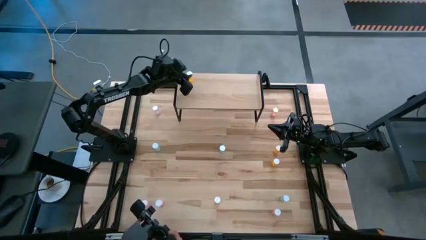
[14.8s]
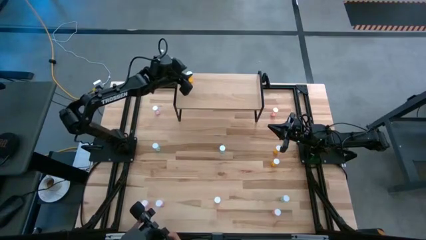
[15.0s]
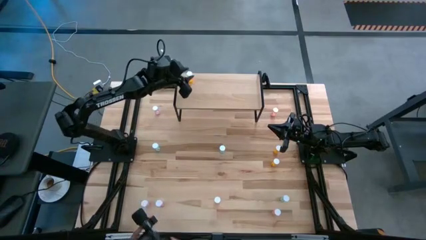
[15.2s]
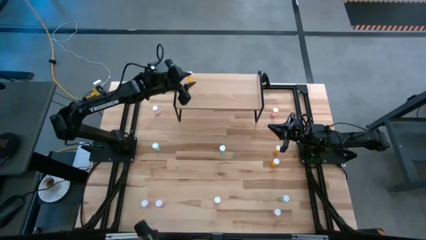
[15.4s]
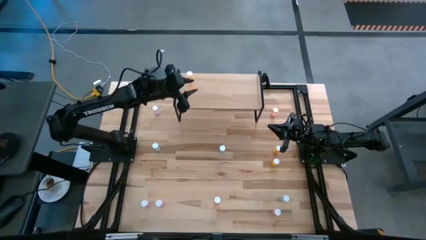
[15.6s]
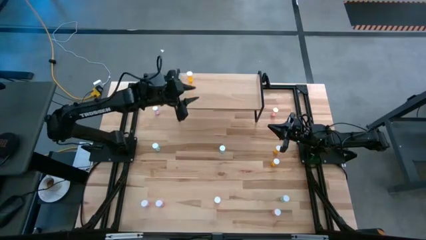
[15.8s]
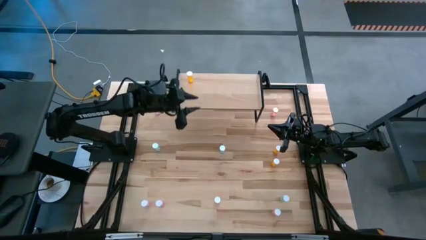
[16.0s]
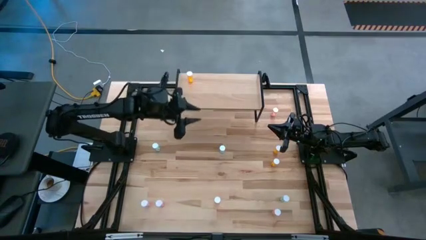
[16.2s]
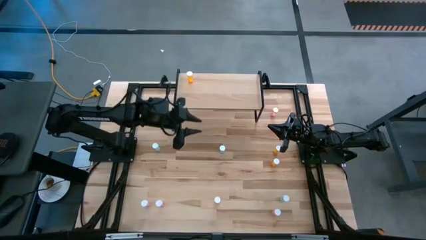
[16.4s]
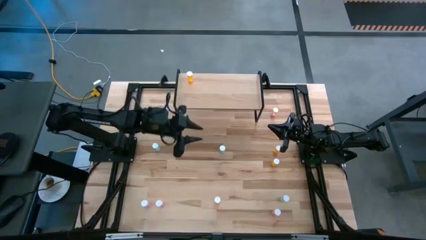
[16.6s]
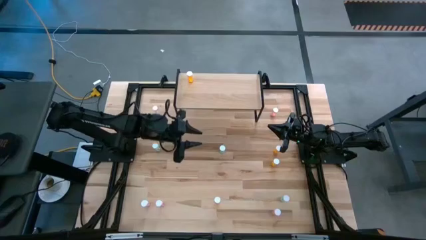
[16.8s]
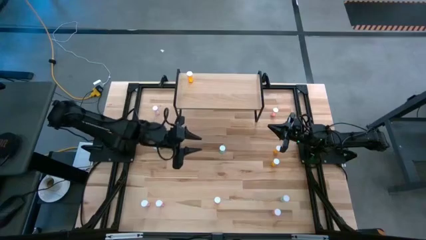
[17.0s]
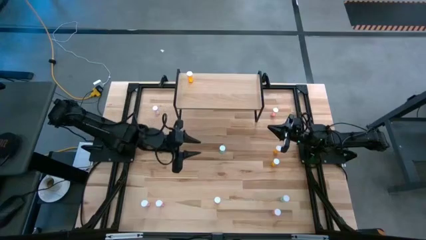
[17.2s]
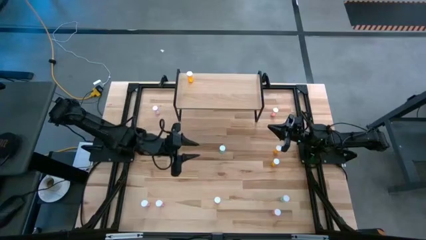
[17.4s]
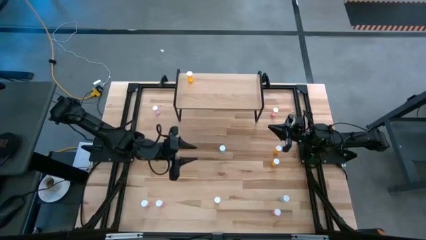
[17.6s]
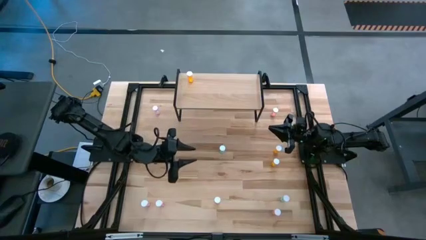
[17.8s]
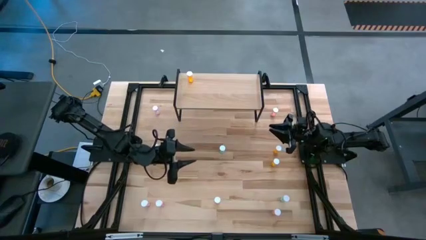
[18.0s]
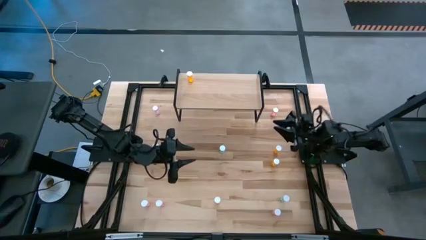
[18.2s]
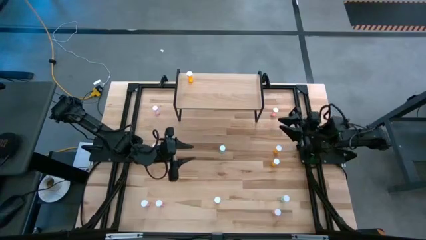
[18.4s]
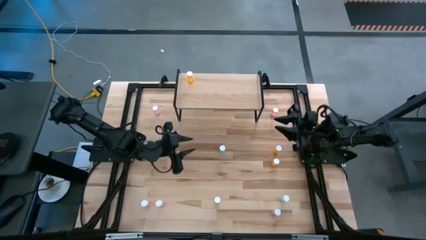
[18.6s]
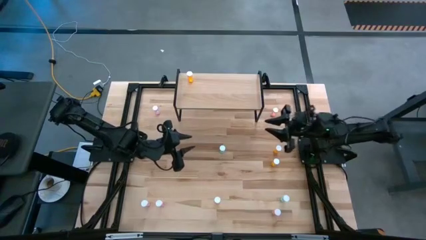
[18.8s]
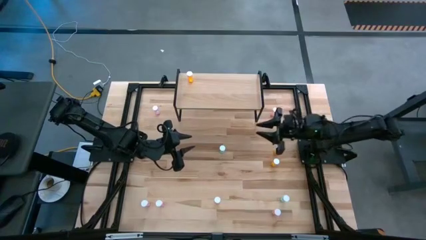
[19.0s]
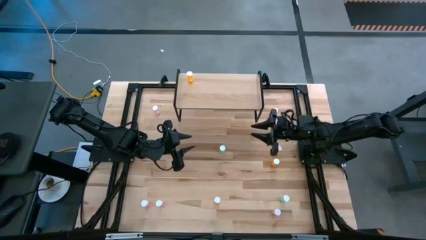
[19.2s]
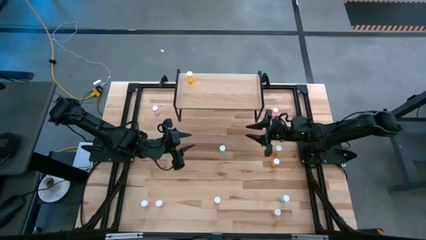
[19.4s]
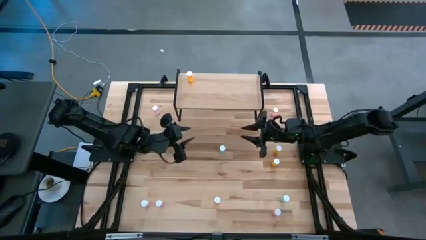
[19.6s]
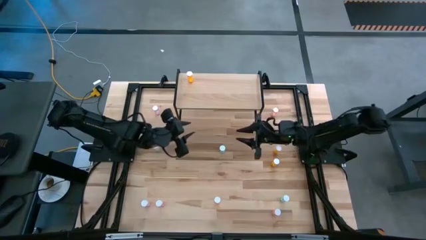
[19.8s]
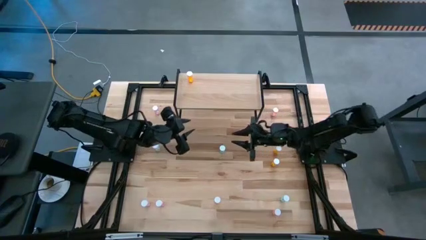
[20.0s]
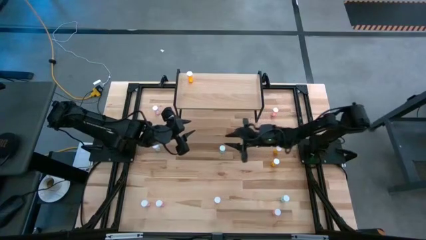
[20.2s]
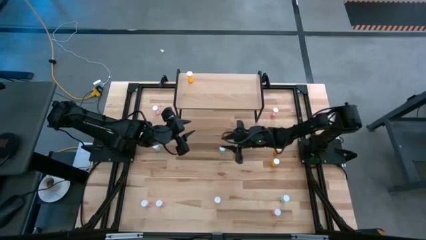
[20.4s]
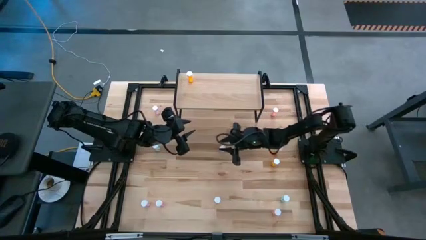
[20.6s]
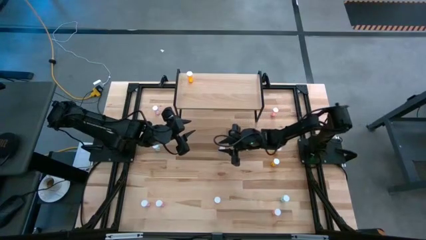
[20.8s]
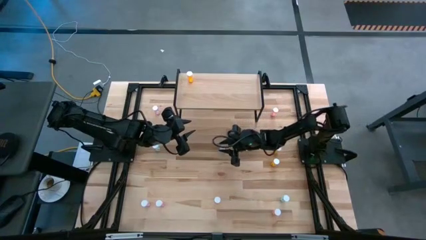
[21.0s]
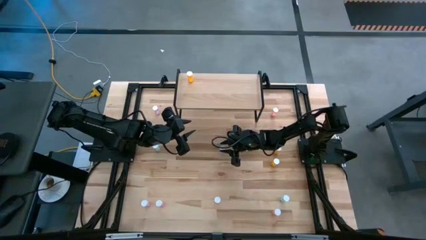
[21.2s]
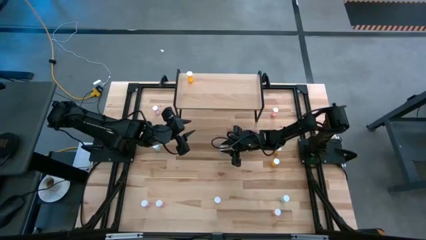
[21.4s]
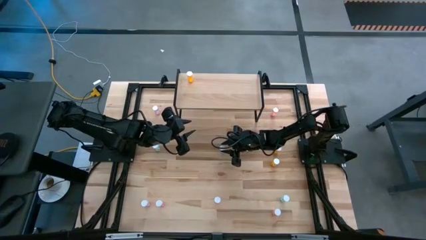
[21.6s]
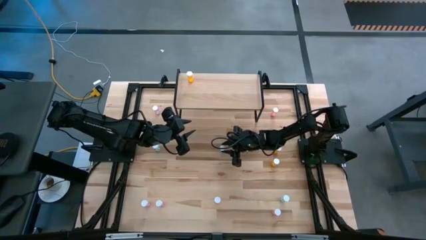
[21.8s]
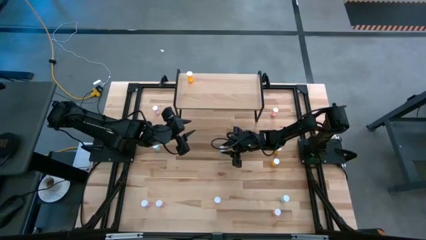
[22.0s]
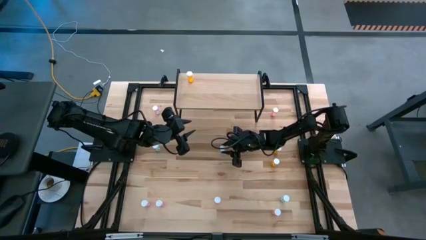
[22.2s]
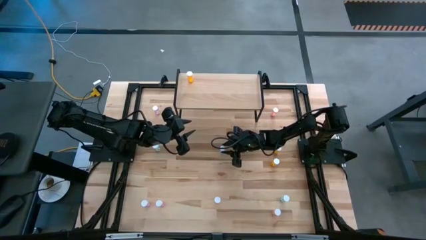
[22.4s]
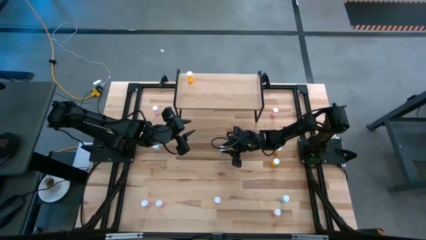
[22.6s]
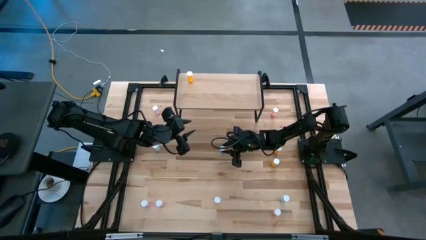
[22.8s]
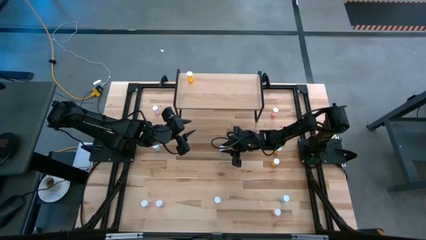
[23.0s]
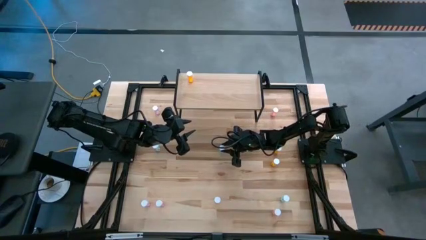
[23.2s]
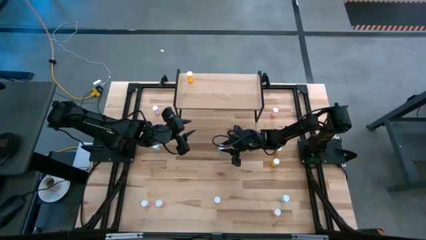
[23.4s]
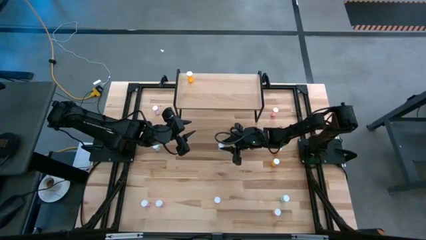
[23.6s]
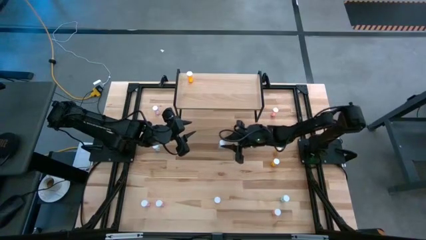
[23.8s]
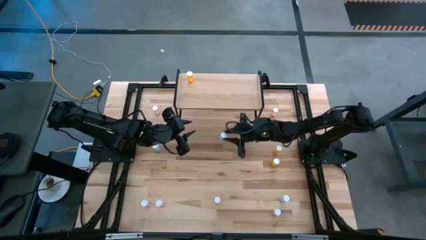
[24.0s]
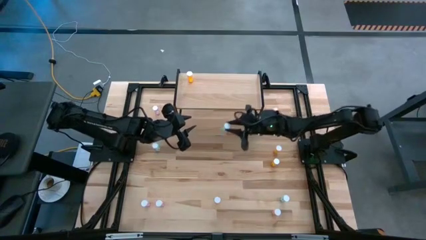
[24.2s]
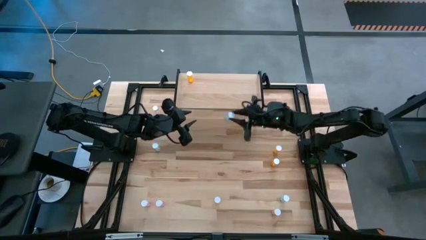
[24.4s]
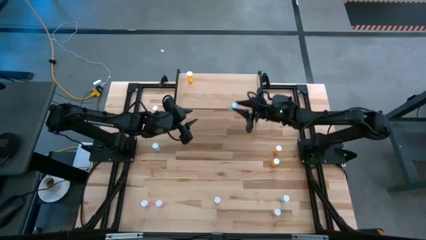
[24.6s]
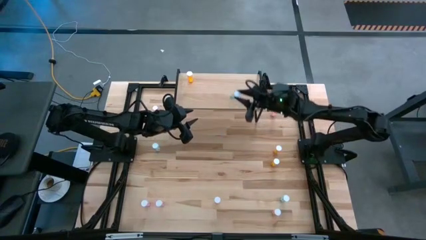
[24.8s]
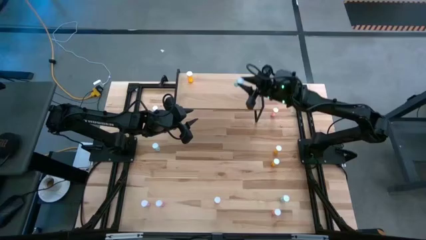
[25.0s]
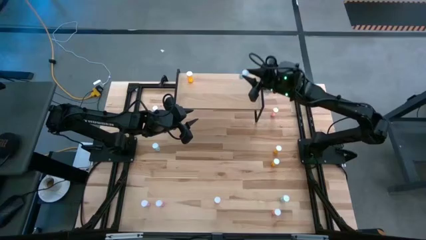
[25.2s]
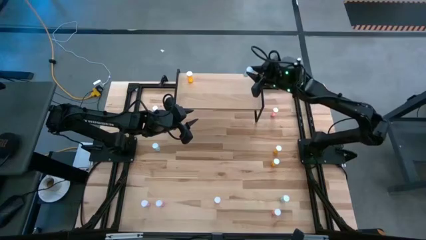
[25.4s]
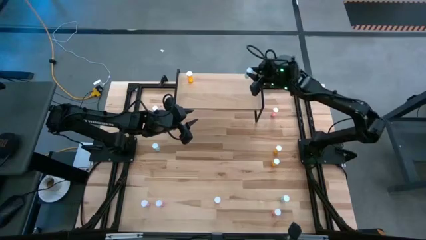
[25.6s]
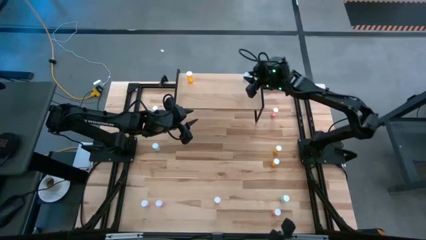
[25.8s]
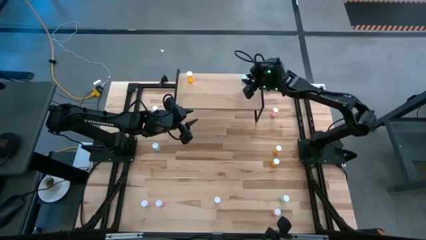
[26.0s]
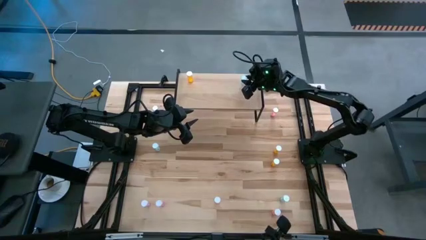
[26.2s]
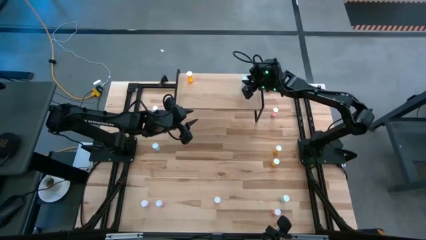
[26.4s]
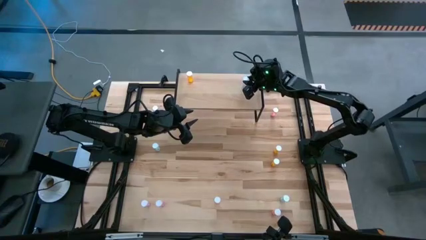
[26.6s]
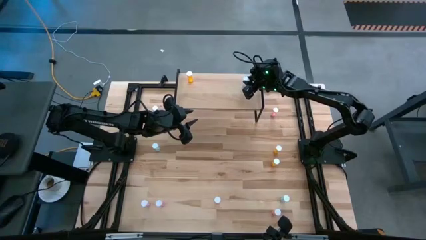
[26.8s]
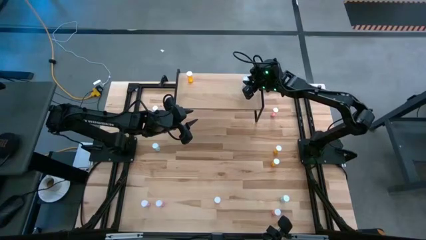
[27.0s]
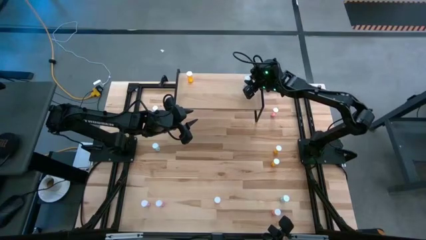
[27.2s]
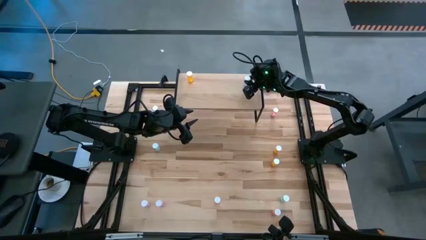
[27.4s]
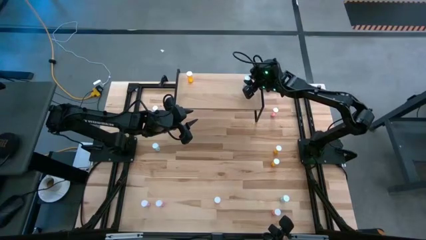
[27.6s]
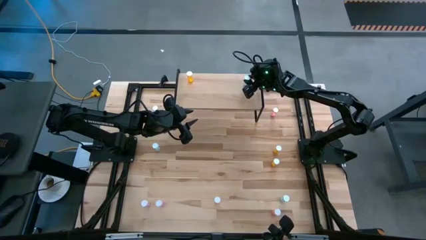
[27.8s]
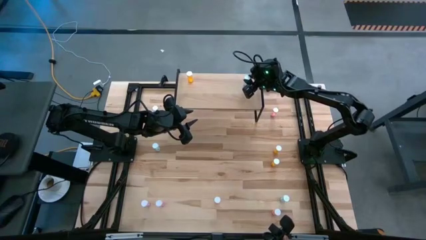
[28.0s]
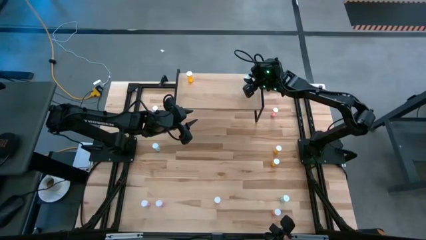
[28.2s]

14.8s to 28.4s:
Task: Pick and place medicine bottles onto shelf by color
Put the top right blue pill bottle on the shelf
